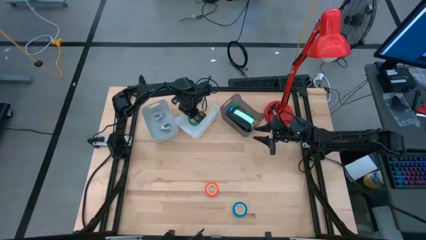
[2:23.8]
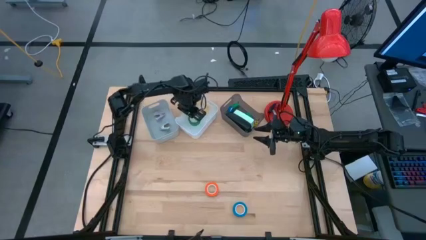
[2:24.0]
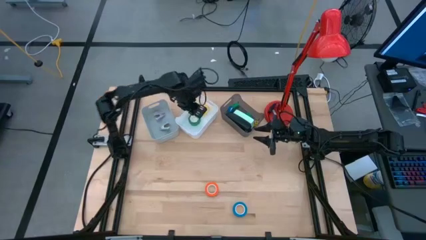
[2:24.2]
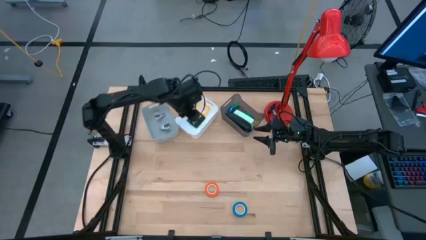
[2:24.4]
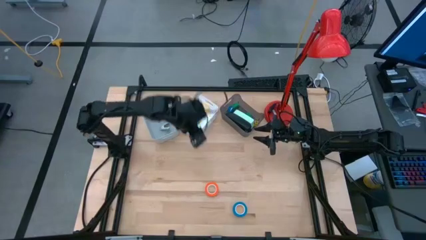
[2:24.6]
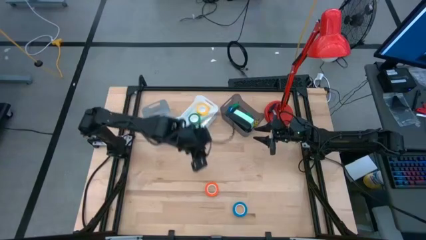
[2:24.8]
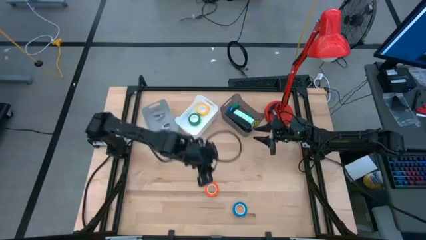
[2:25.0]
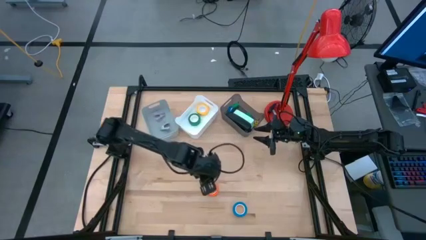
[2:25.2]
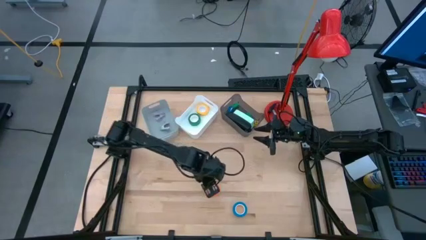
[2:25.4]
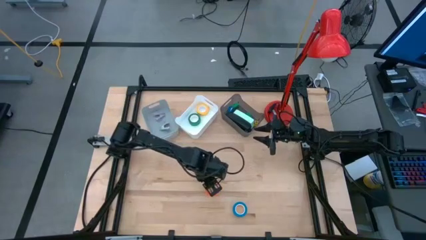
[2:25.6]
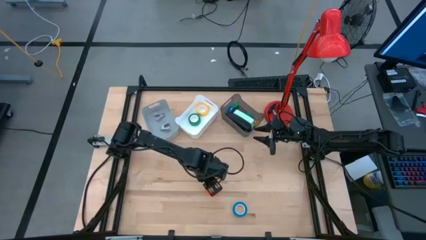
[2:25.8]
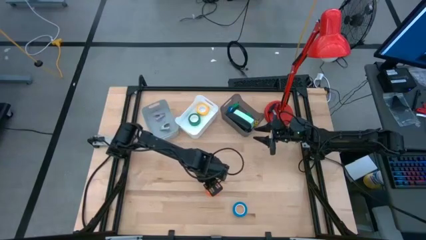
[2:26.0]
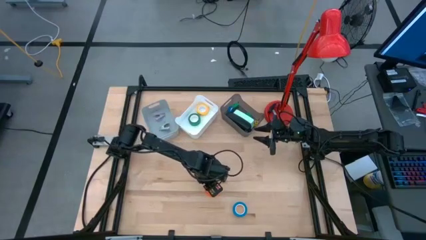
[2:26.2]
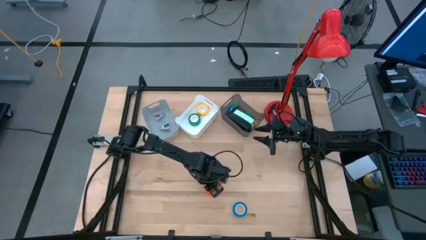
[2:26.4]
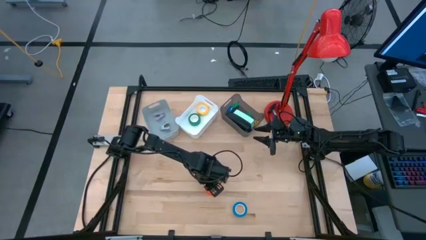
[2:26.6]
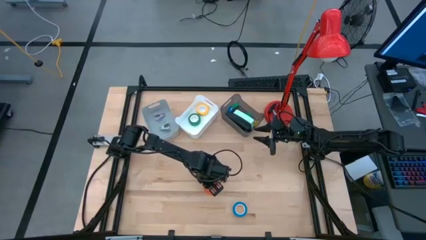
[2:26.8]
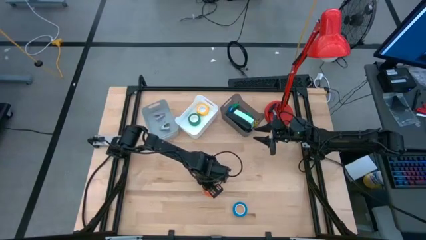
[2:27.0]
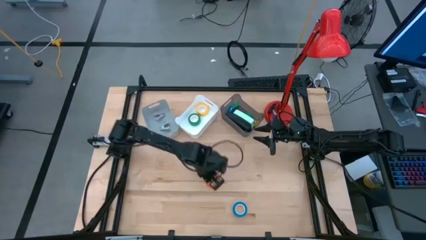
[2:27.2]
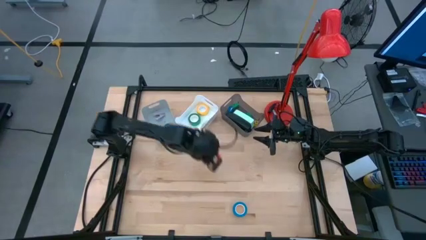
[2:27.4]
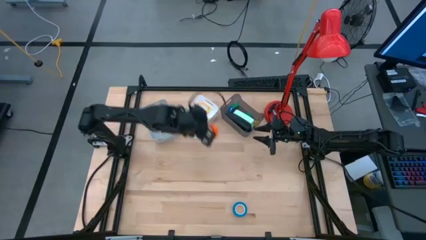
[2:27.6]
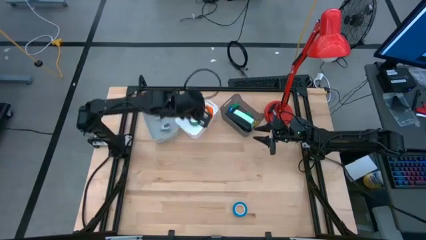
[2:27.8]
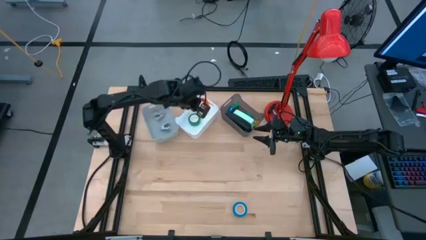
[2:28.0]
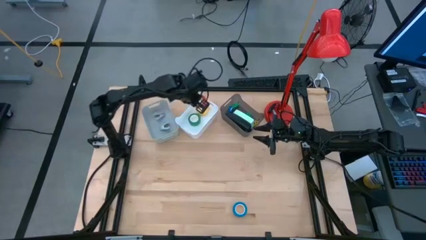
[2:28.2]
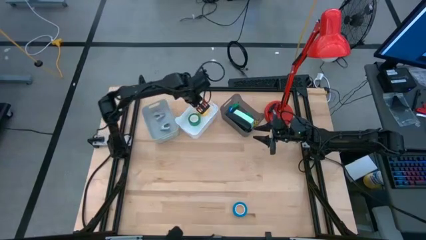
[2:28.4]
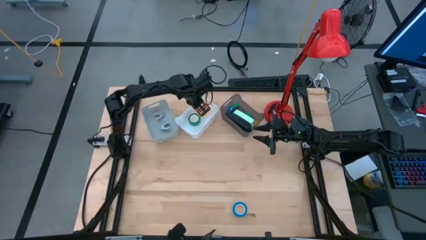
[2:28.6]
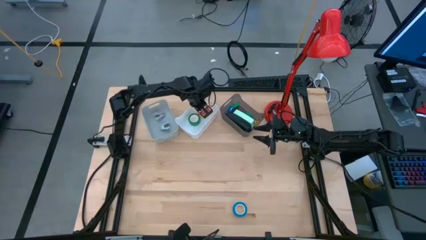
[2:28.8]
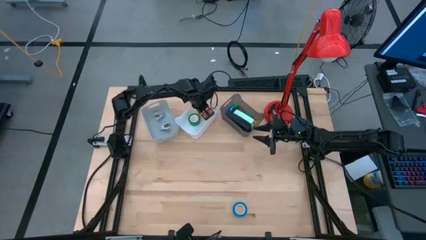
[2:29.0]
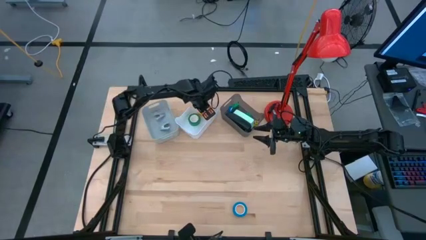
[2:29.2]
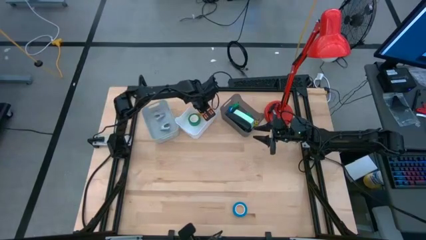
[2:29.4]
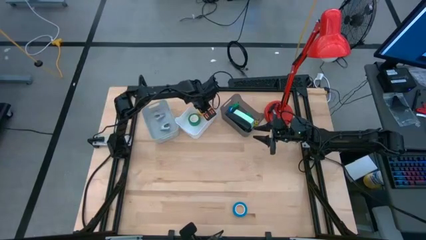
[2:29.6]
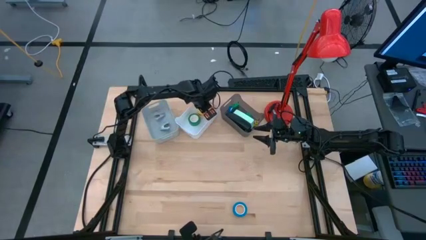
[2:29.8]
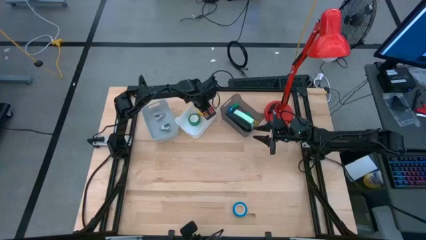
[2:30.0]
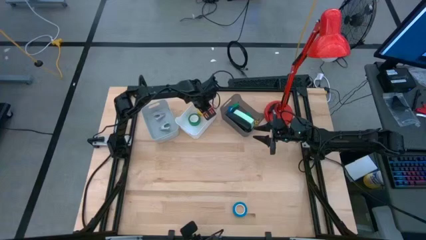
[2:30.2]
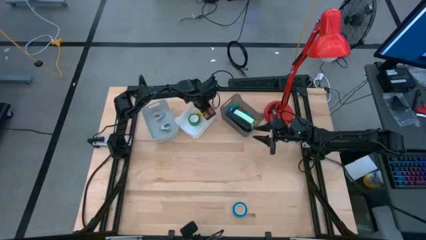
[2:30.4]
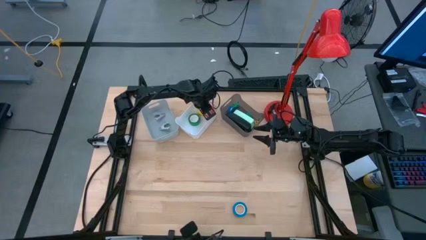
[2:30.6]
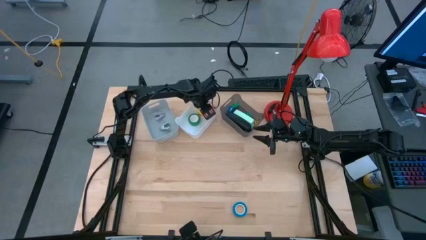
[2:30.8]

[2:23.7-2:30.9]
Task: Pick and place Stapler, Stapler remover, tape
Put the orange tape into the white bin

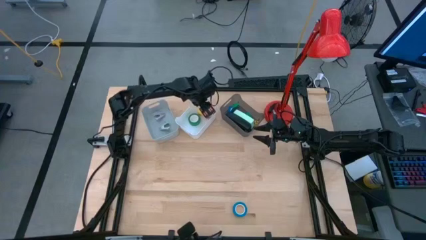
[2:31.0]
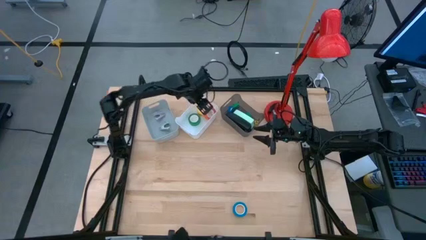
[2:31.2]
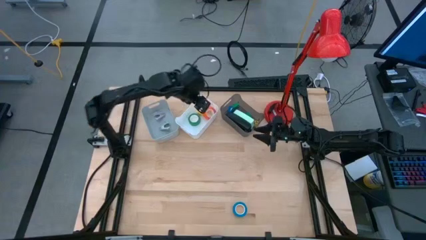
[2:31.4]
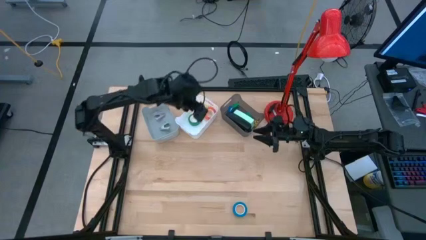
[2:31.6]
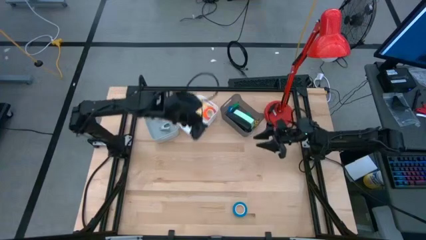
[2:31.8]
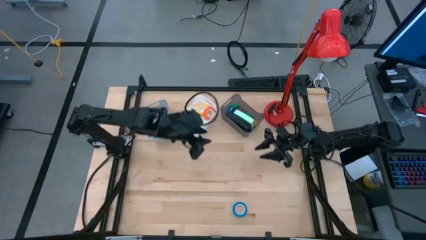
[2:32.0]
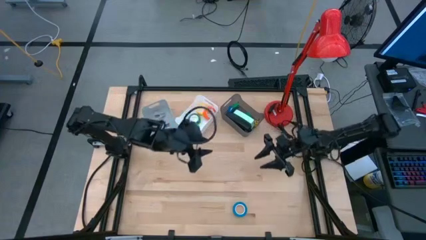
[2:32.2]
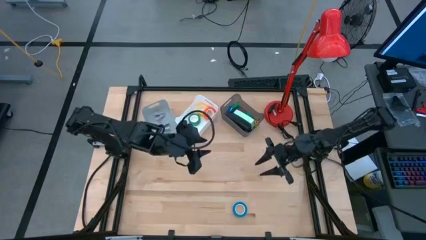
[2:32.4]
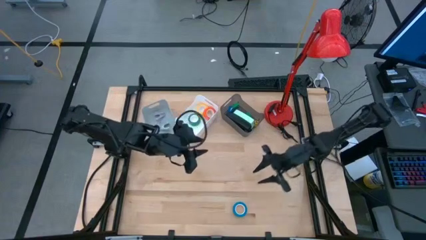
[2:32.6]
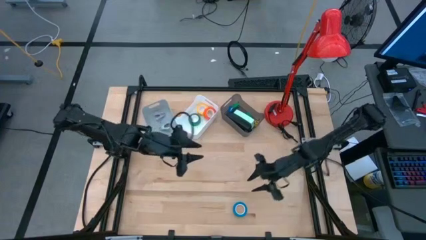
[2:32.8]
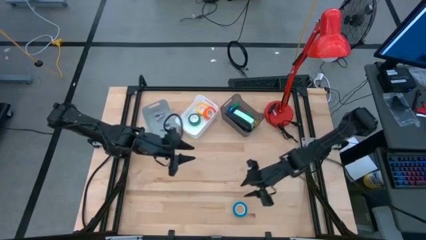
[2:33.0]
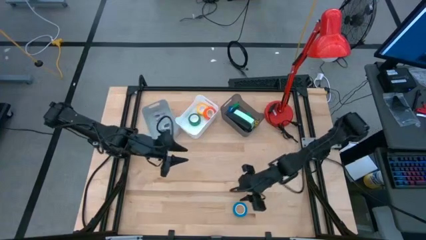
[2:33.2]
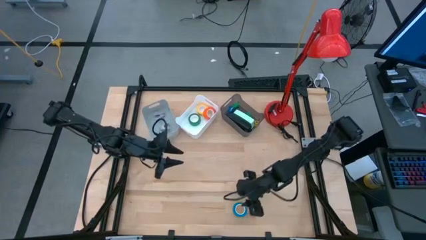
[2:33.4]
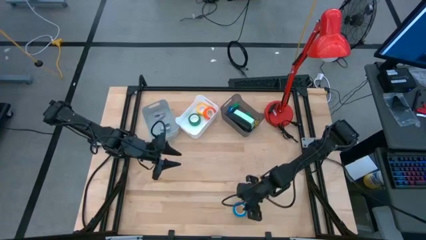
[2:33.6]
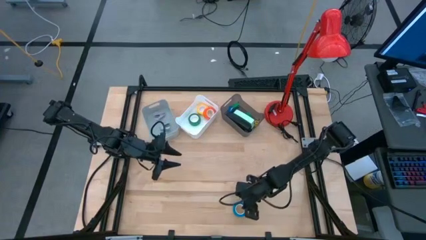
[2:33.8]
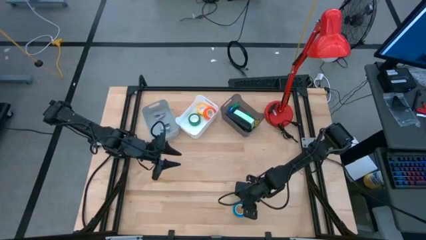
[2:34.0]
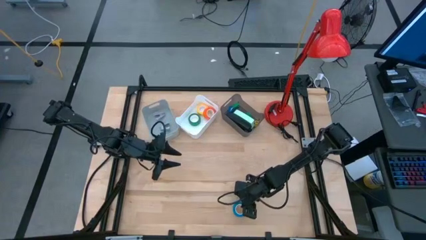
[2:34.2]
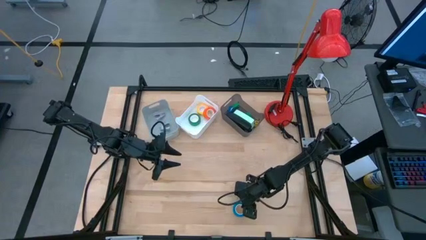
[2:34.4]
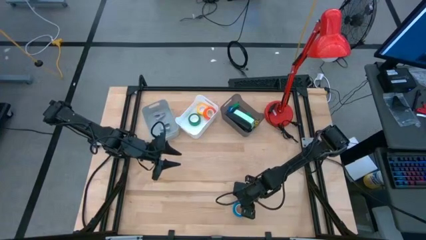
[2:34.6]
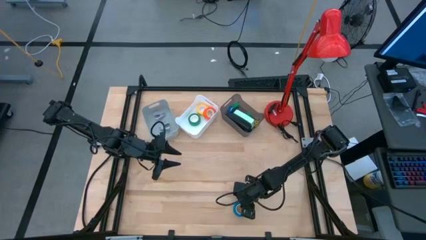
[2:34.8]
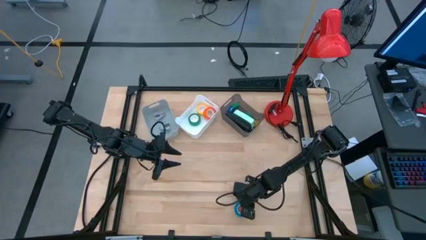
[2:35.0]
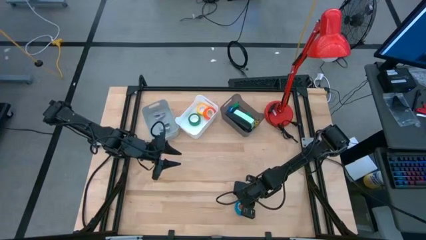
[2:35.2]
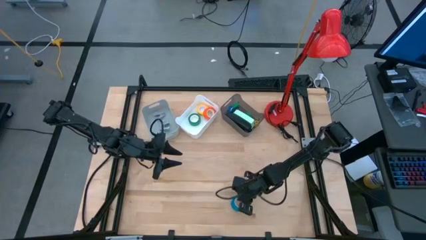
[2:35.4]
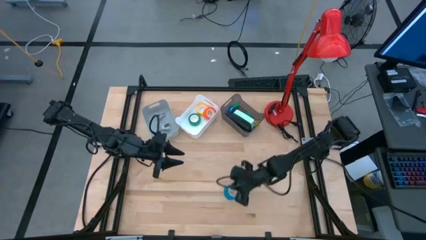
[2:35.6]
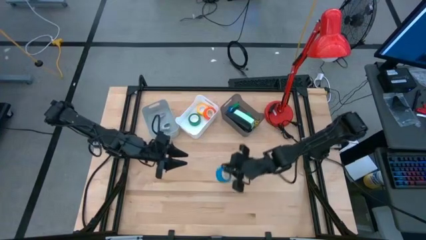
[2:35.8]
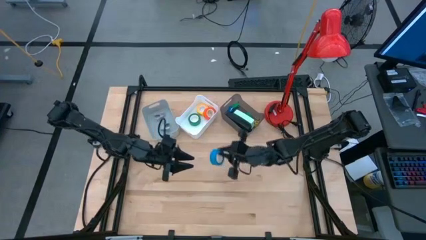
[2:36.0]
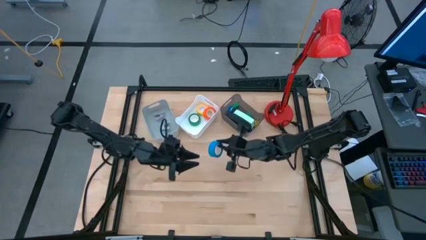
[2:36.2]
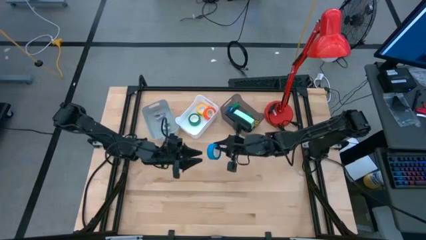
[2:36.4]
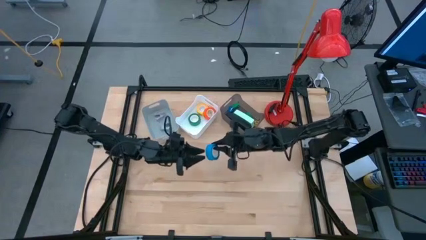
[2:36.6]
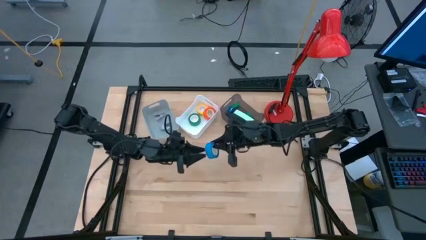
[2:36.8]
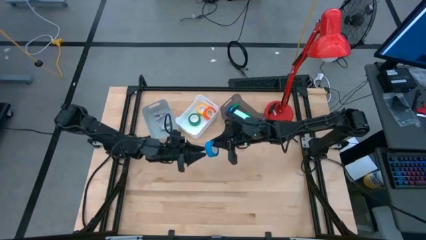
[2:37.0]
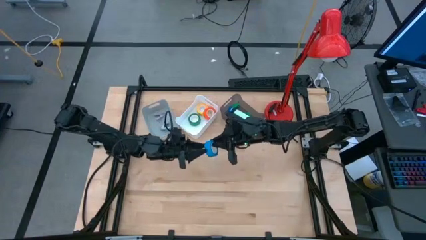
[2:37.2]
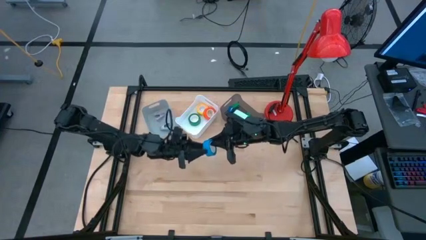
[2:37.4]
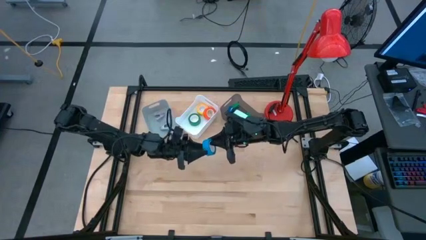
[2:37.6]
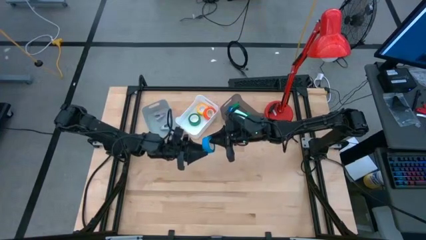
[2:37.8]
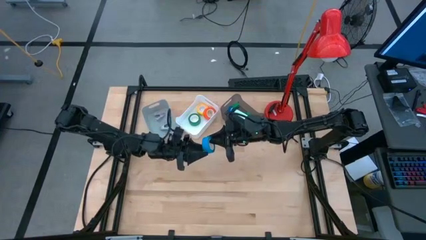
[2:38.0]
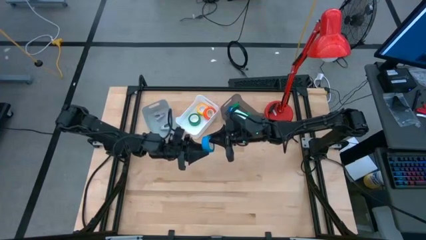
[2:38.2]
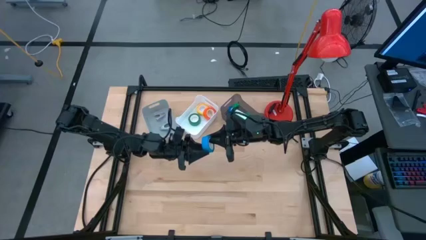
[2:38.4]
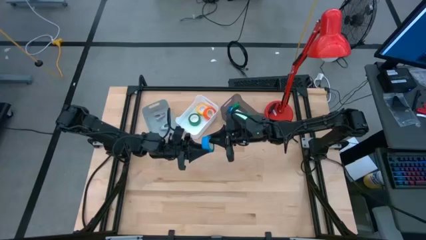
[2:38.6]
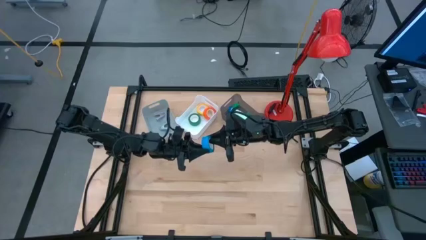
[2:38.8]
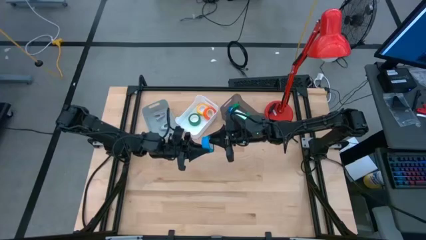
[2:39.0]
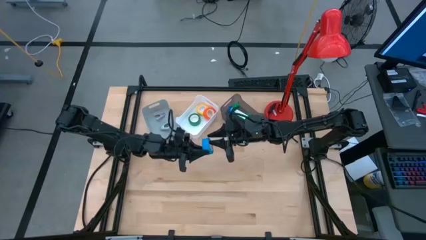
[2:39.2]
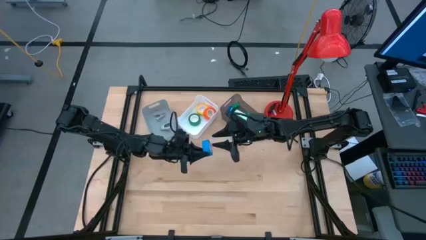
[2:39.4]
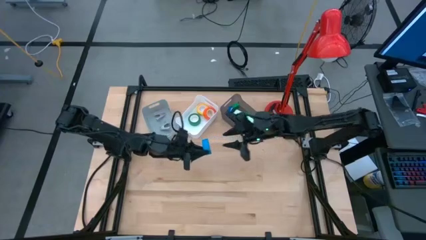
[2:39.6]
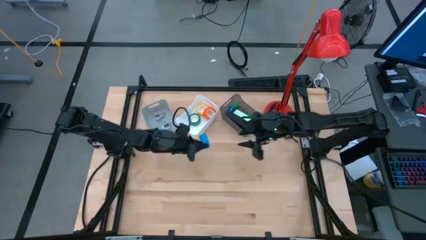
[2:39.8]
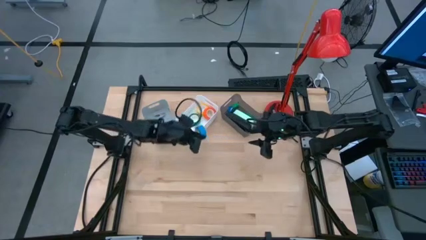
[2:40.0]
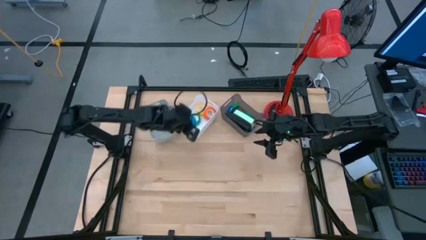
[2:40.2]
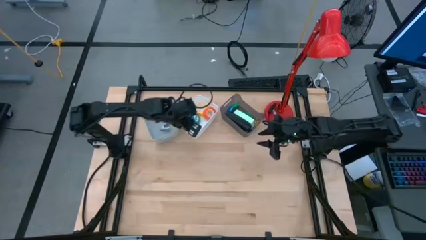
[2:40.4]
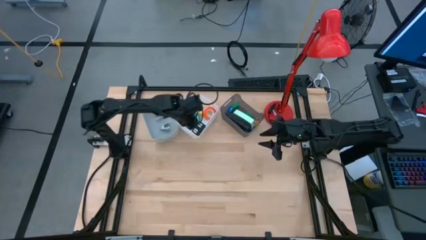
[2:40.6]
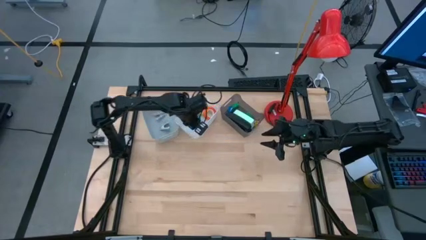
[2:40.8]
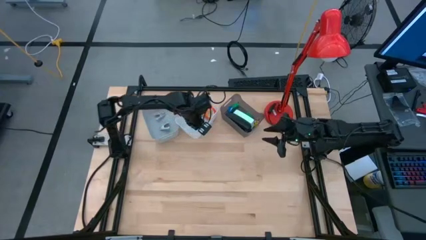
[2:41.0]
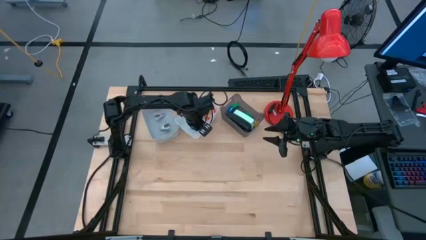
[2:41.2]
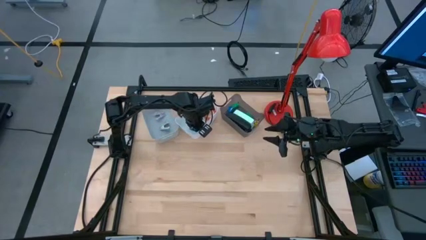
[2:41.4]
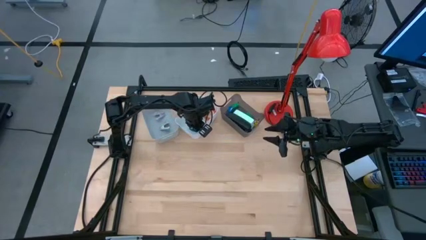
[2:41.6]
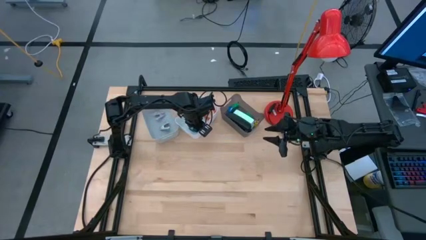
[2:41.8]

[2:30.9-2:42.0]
Put the blue tape into the white bin
